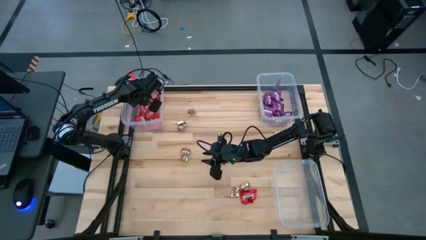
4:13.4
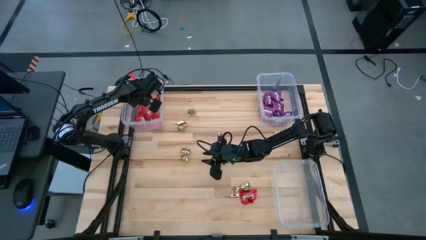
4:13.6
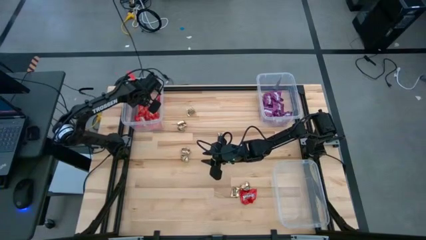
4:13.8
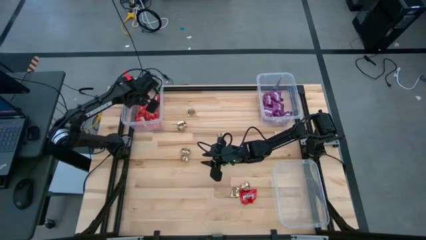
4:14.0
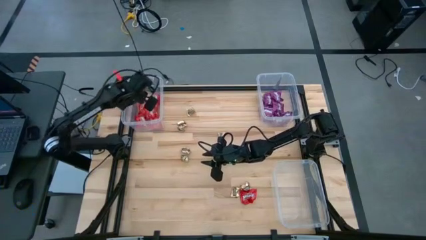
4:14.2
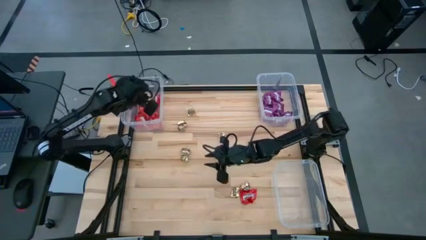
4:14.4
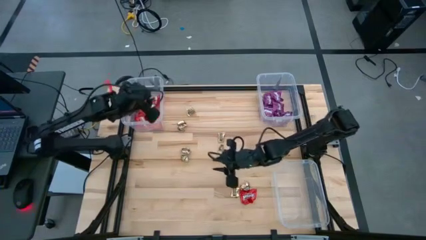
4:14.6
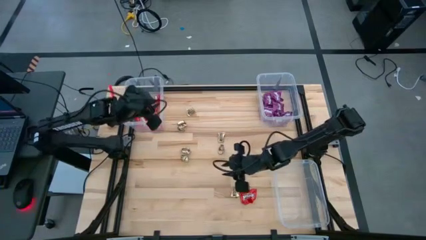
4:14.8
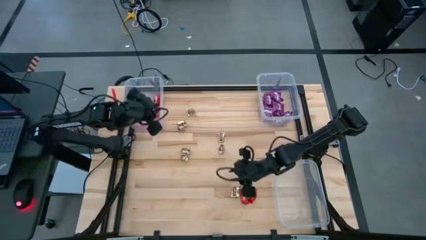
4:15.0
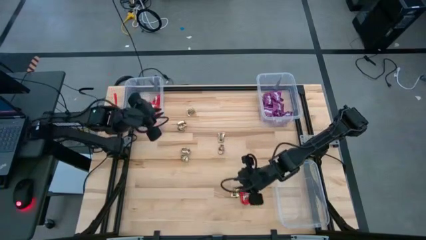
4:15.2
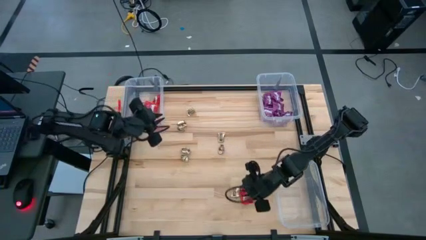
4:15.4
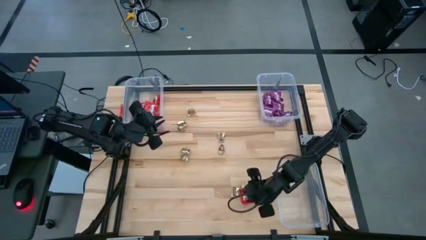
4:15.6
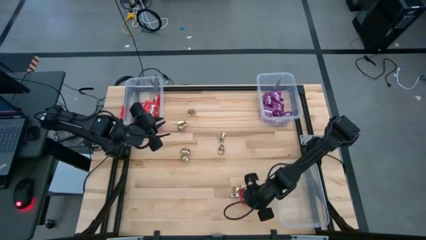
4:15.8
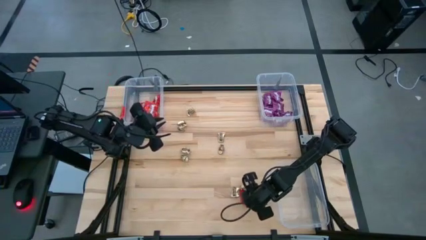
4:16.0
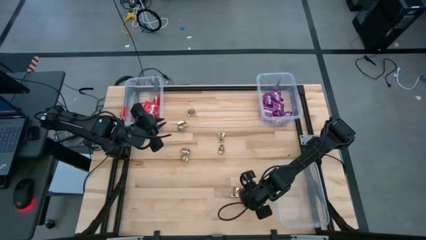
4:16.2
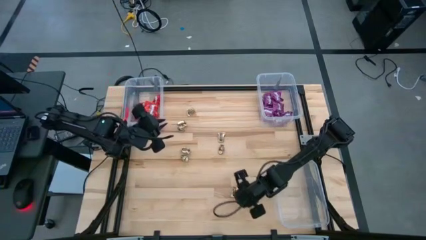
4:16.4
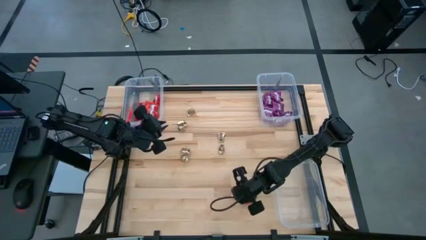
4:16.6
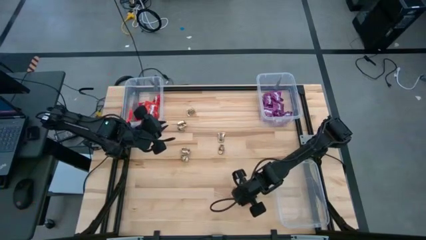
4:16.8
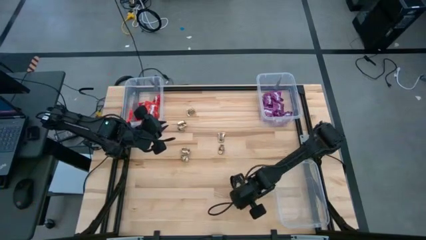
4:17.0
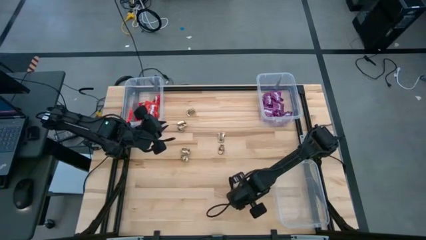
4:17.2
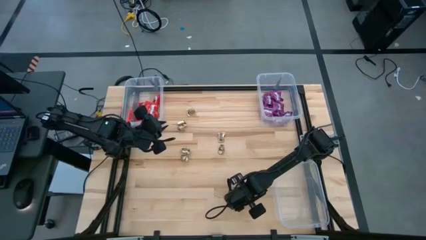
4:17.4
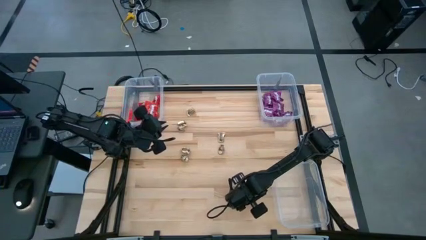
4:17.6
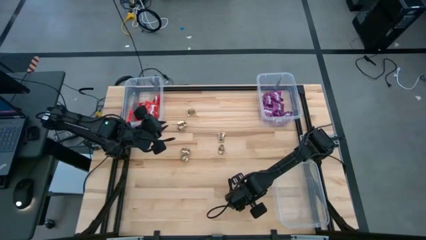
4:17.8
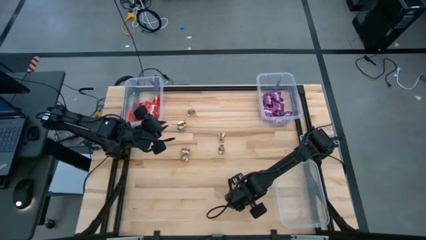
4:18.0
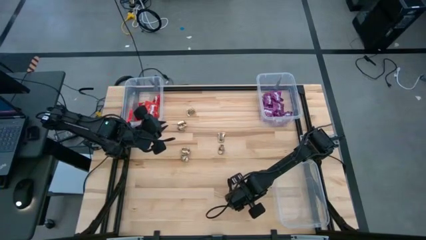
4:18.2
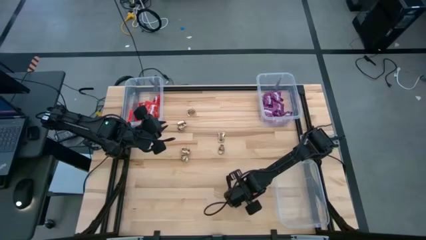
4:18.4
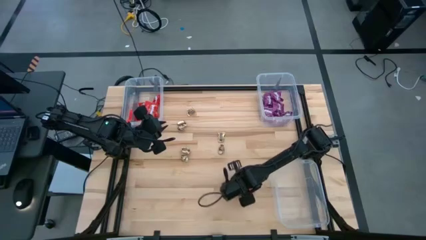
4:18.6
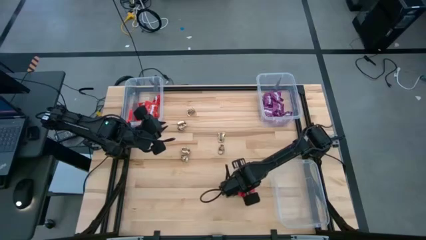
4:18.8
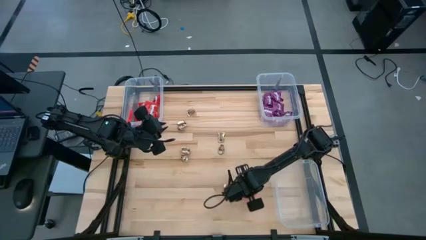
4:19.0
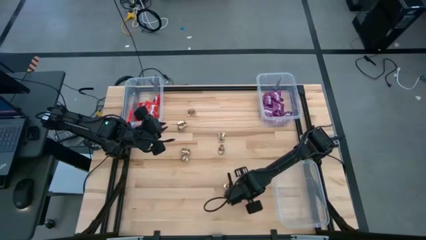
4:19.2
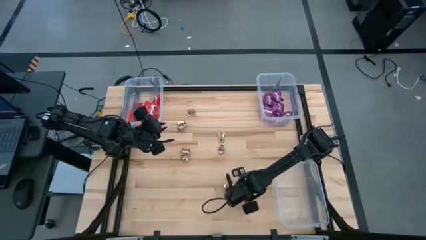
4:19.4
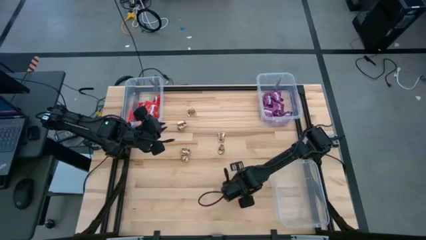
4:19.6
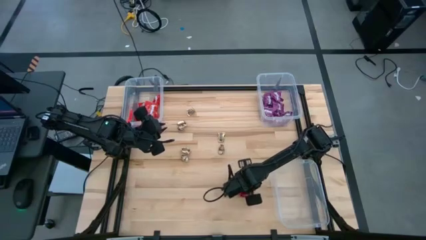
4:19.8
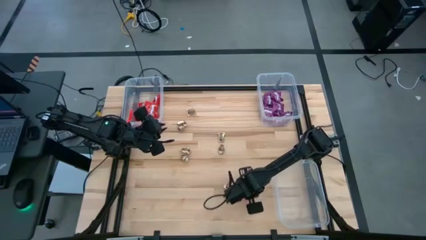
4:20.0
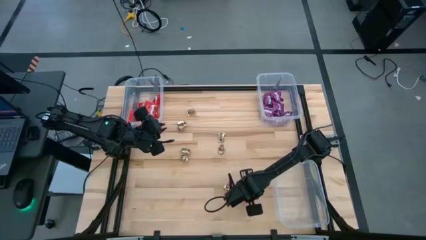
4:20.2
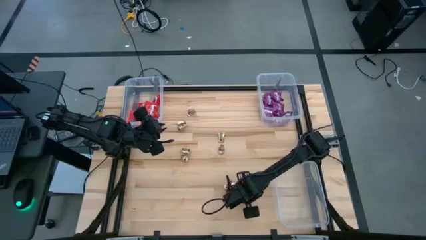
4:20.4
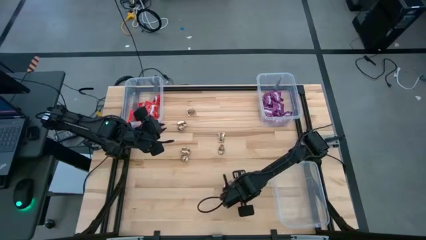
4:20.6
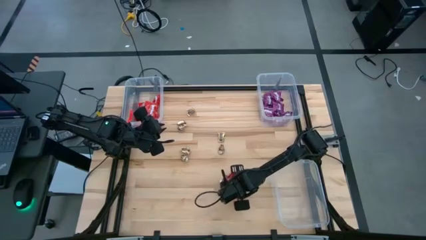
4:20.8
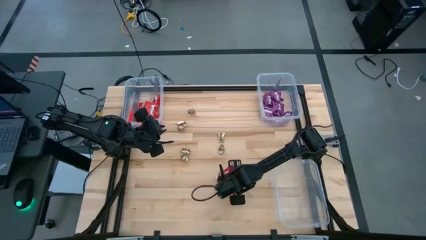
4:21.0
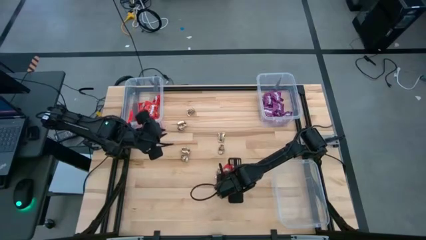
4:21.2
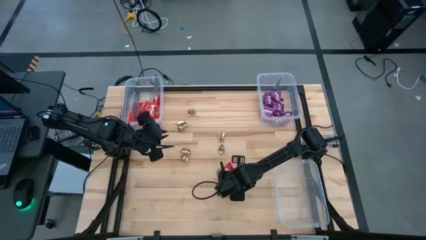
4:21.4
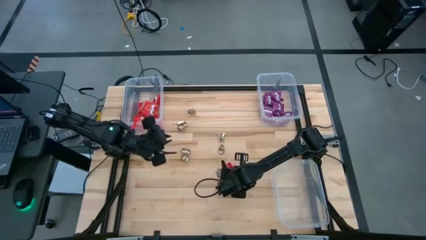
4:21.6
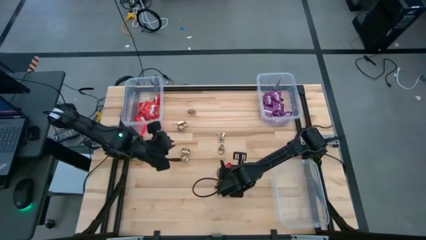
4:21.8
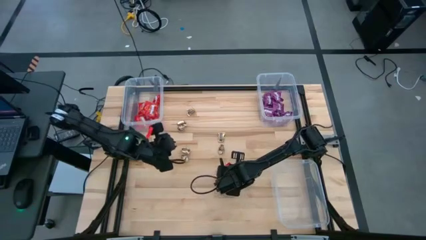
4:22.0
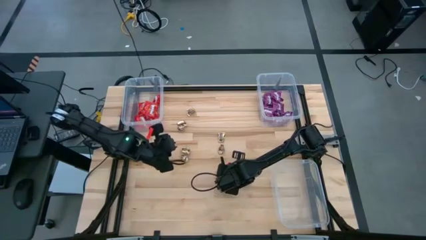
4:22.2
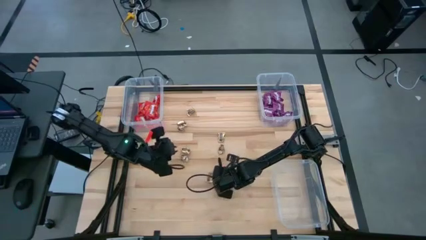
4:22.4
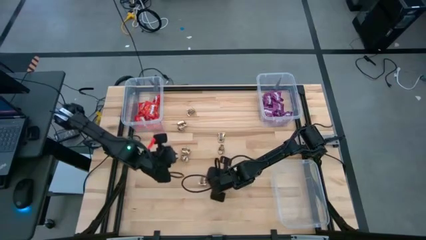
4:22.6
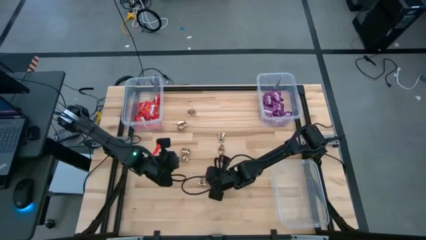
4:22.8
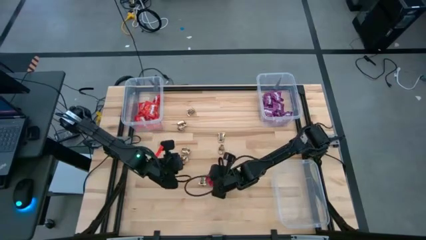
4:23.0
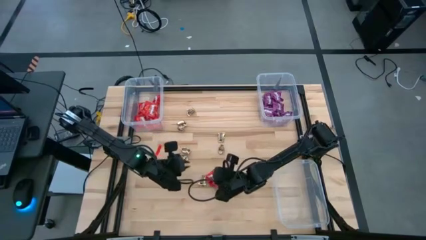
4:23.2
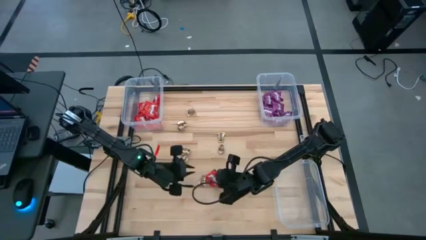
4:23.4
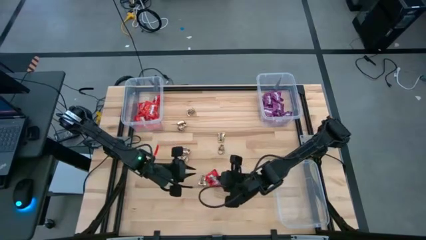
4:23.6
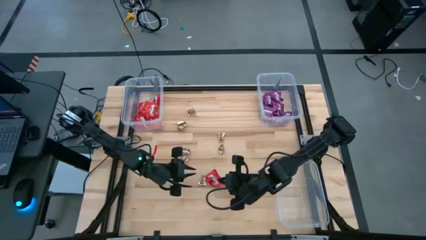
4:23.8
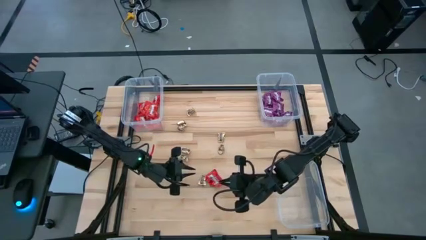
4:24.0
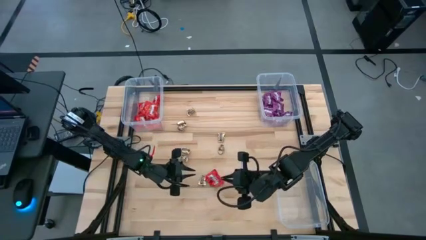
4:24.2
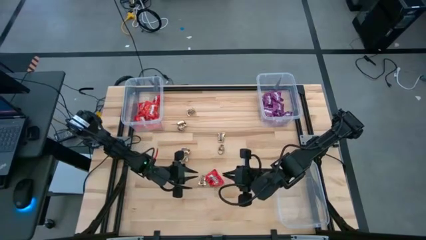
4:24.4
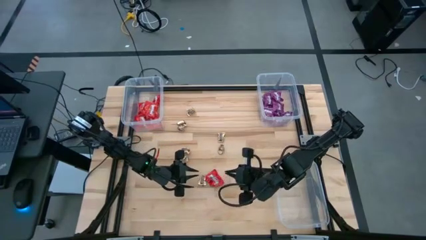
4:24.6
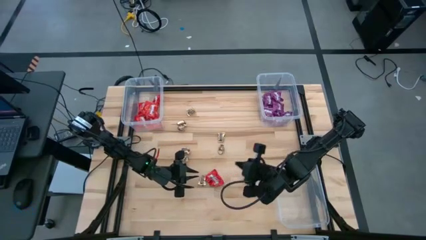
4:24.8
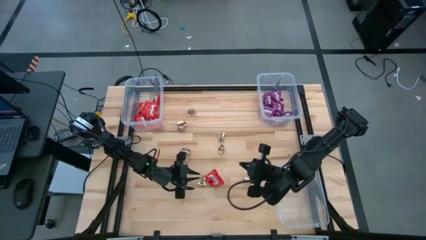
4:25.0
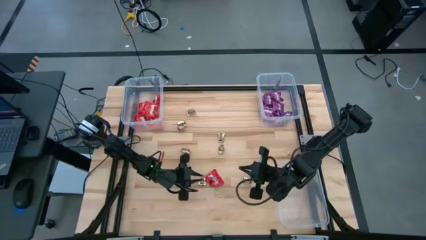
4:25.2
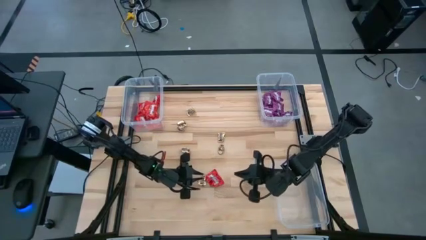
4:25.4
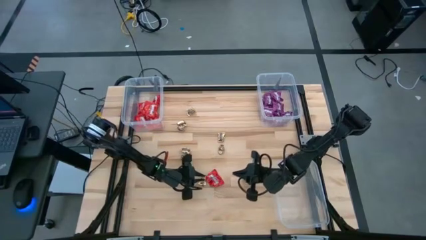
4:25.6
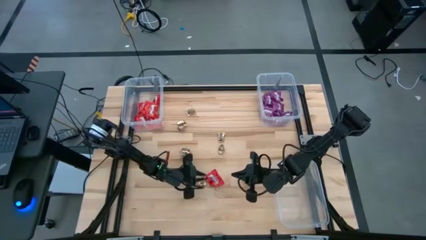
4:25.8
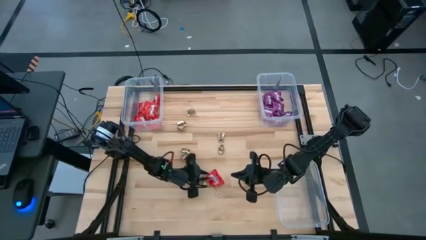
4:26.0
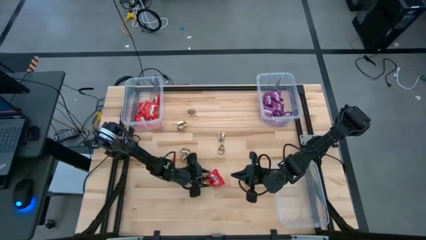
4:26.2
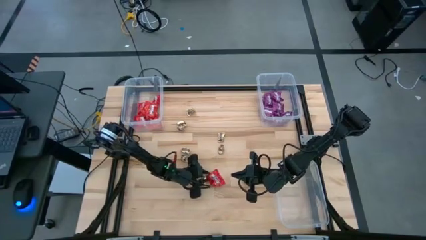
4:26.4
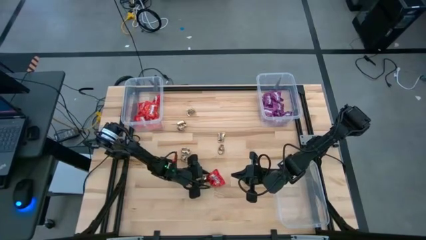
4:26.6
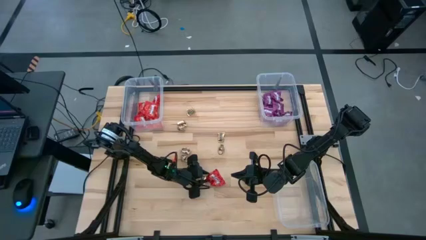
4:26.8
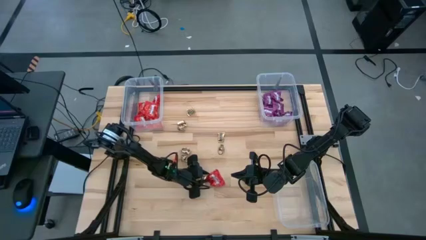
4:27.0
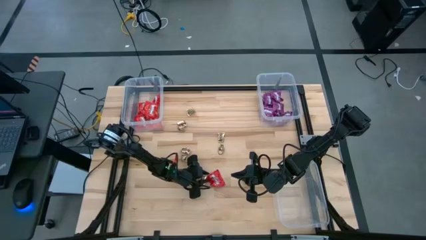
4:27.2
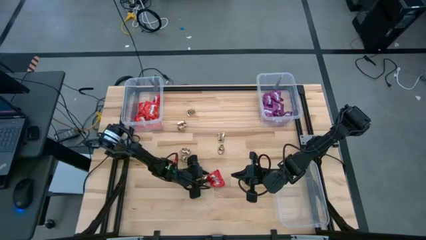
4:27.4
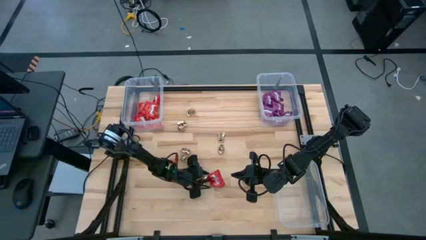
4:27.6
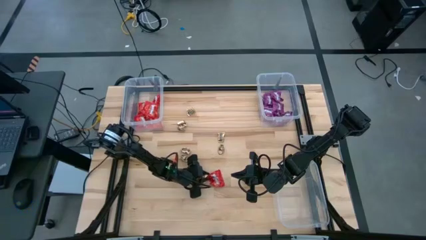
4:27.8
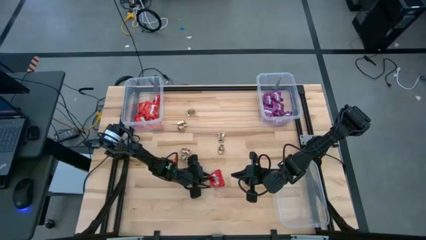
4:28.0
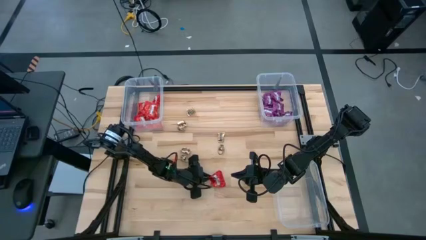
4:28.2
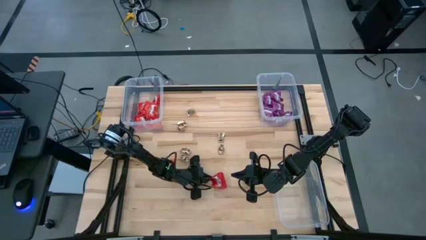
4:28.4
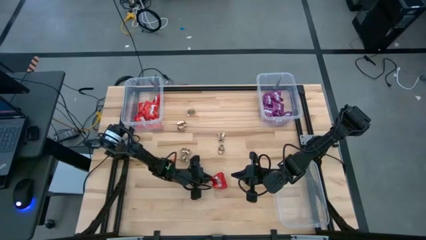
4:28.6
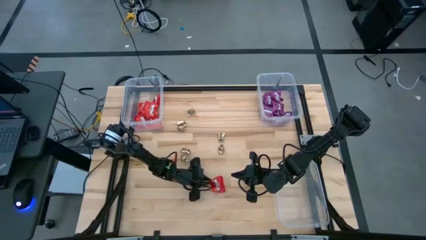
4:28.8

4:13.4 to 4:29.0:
Task: Sort candy
Put the red candy into the top left transparent bin

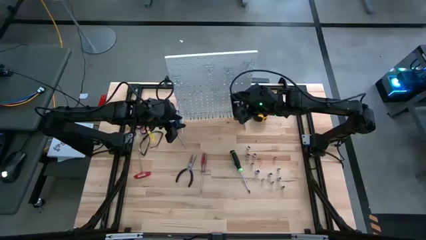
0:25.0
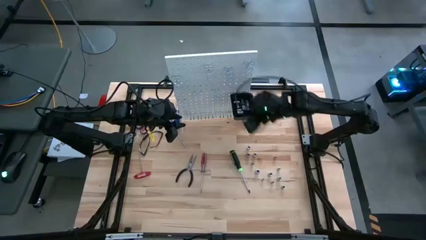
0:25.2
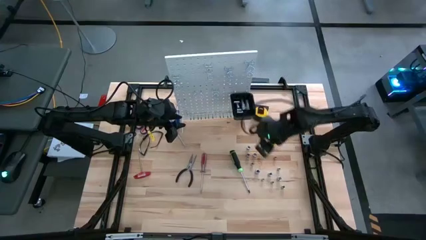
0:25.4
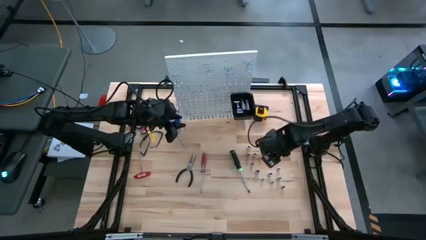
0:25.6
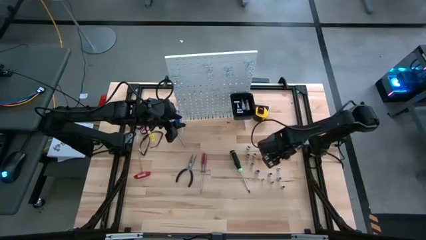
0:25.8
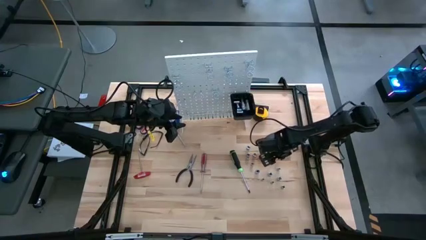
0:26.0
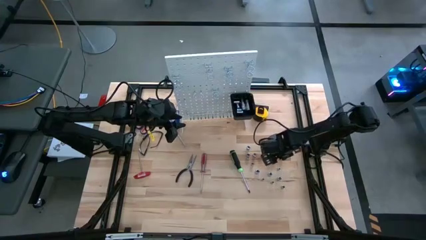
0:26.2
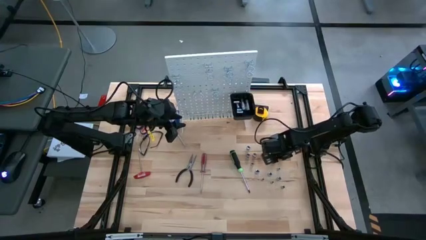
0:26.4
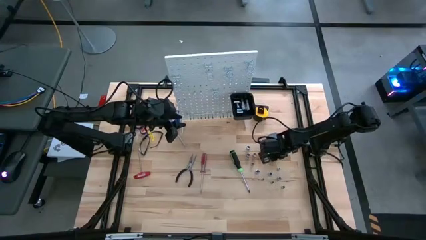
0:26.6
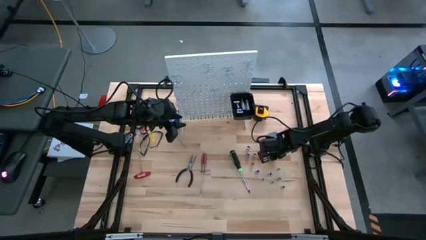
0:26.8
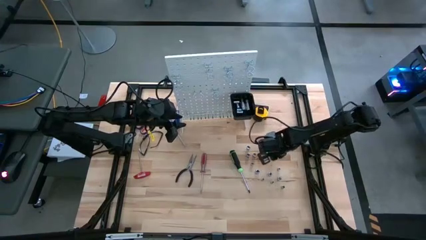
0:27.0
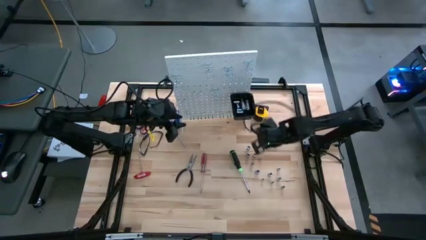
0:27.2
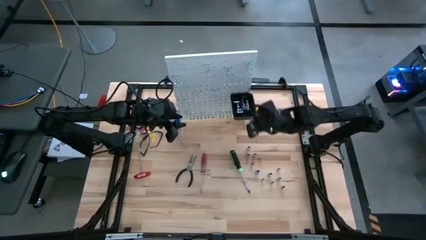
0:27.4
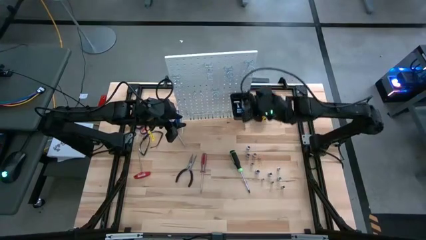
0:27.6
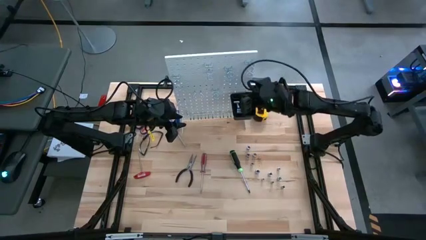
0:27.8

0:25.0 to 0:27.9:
Task: Hang tools onto peg board
Put the silver socket into the black bin on the peg board
